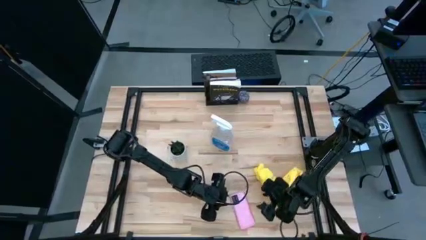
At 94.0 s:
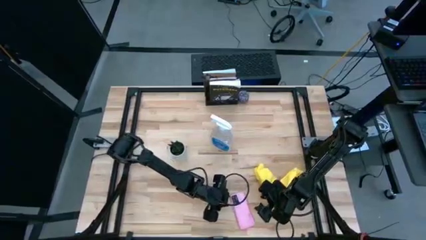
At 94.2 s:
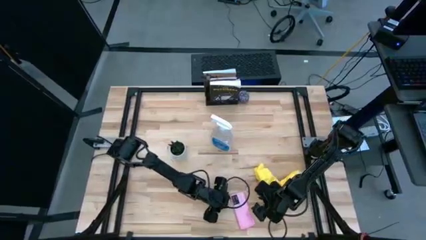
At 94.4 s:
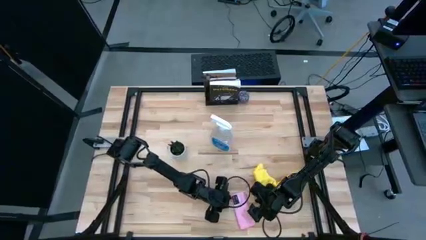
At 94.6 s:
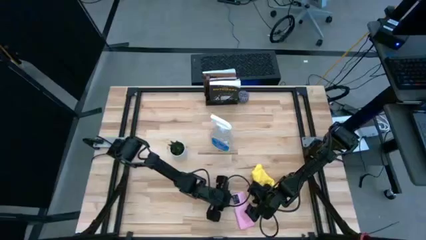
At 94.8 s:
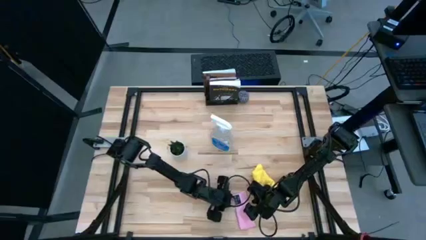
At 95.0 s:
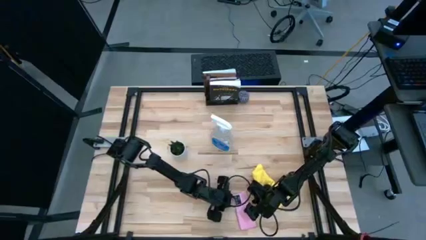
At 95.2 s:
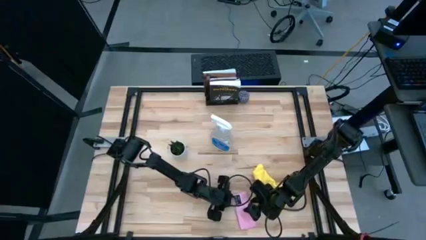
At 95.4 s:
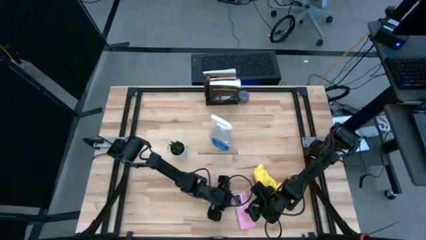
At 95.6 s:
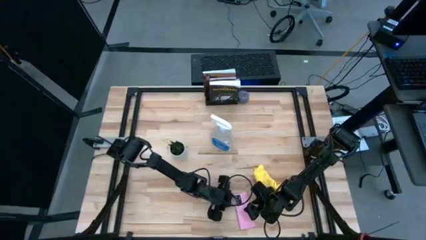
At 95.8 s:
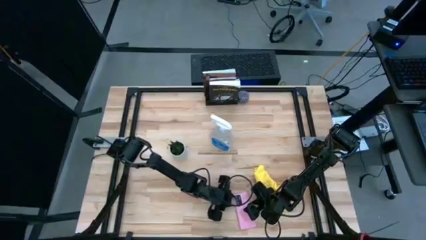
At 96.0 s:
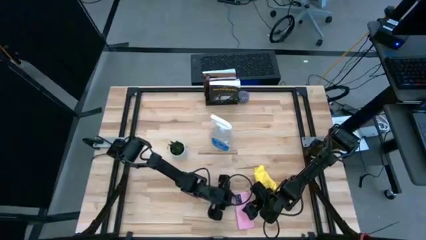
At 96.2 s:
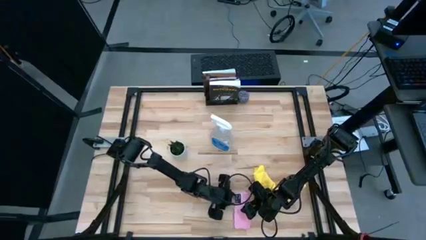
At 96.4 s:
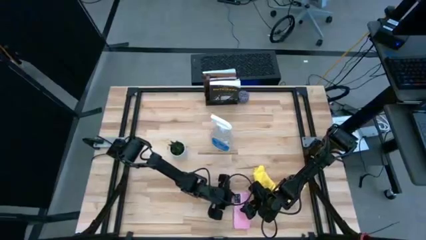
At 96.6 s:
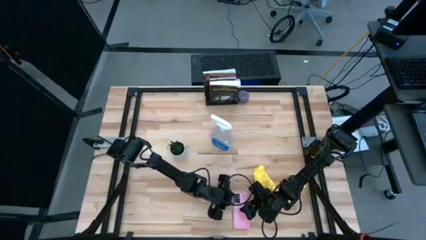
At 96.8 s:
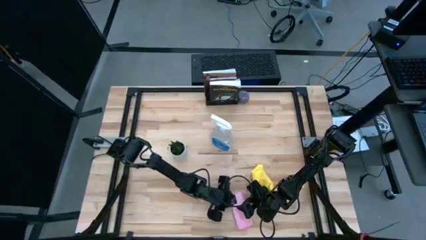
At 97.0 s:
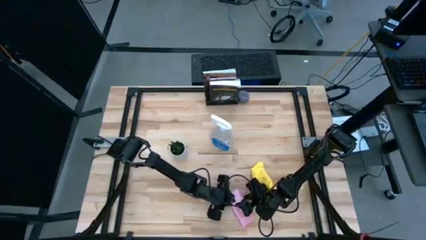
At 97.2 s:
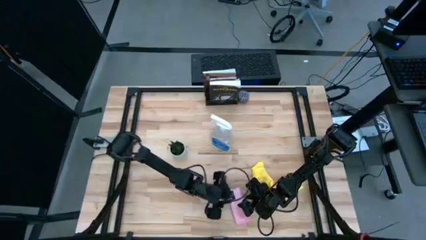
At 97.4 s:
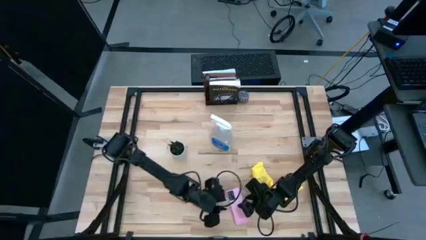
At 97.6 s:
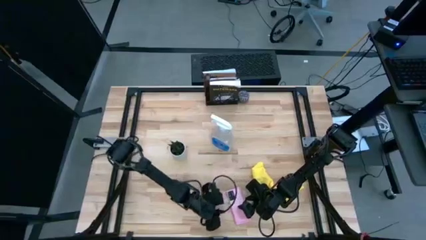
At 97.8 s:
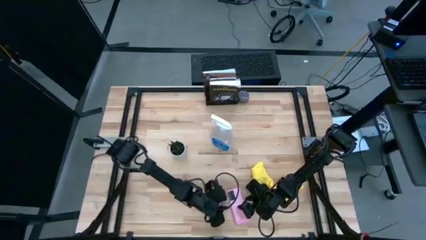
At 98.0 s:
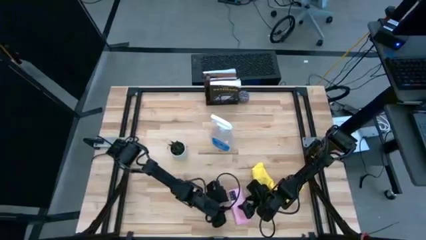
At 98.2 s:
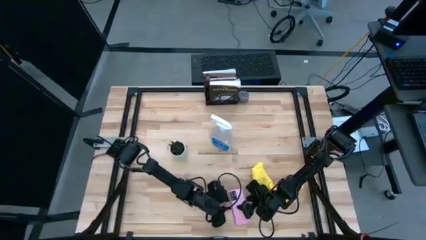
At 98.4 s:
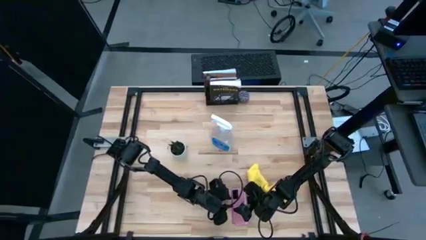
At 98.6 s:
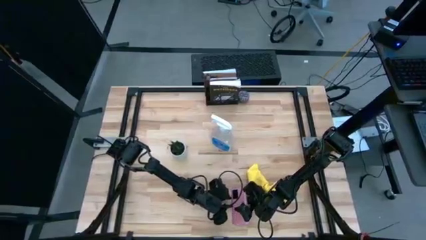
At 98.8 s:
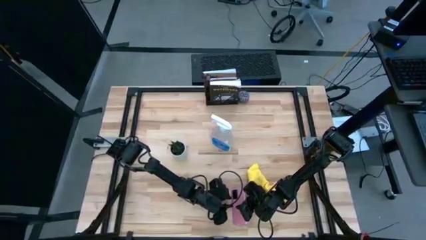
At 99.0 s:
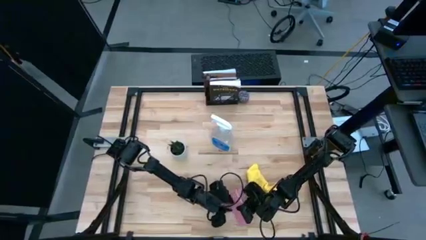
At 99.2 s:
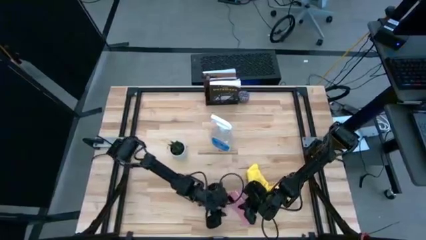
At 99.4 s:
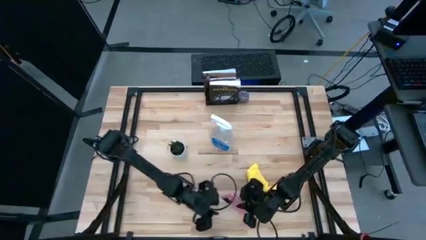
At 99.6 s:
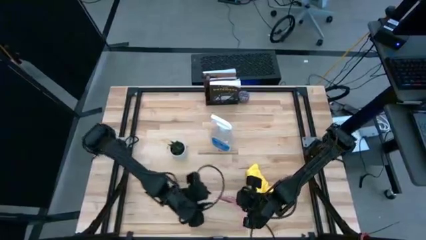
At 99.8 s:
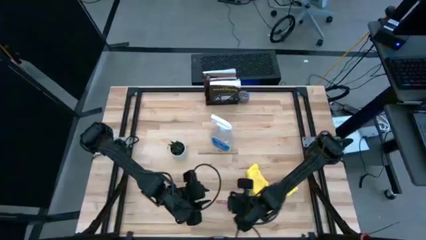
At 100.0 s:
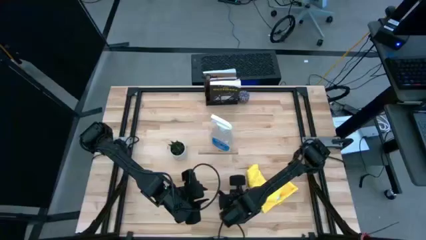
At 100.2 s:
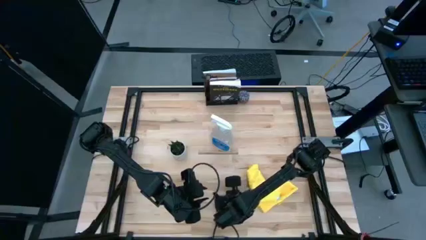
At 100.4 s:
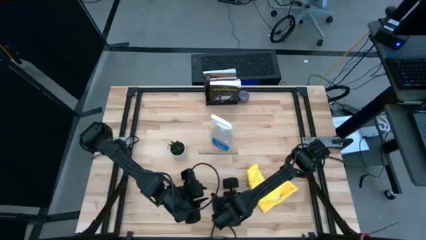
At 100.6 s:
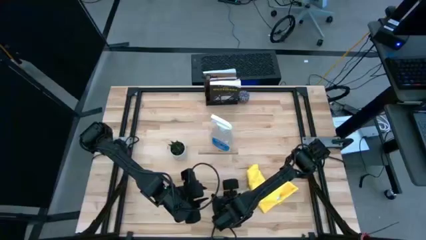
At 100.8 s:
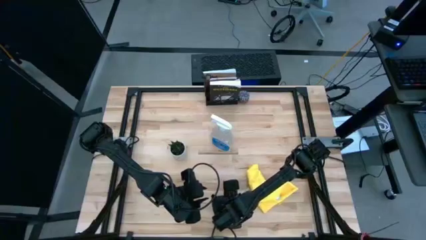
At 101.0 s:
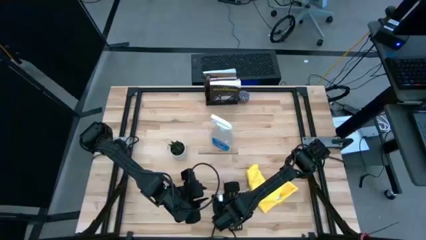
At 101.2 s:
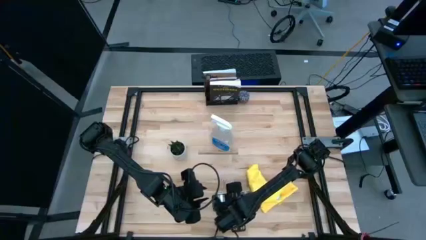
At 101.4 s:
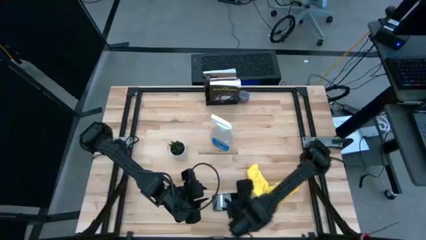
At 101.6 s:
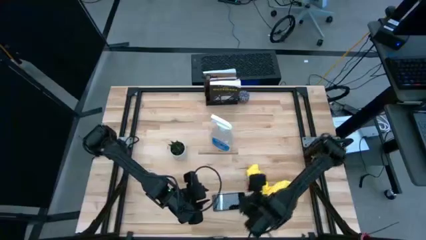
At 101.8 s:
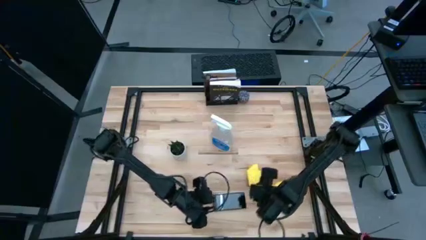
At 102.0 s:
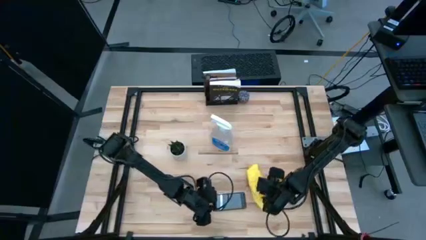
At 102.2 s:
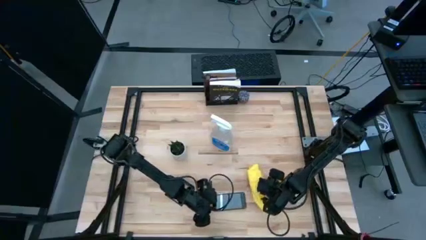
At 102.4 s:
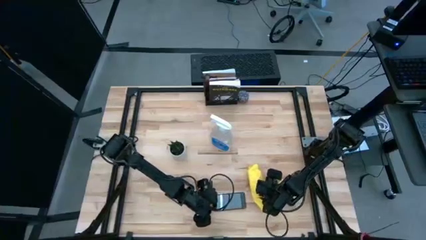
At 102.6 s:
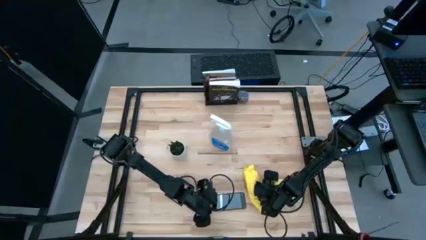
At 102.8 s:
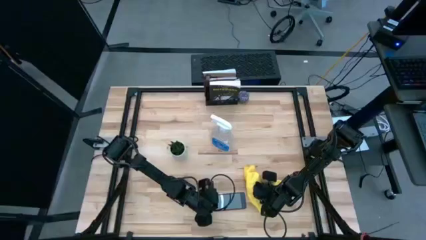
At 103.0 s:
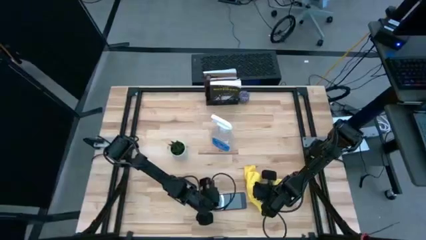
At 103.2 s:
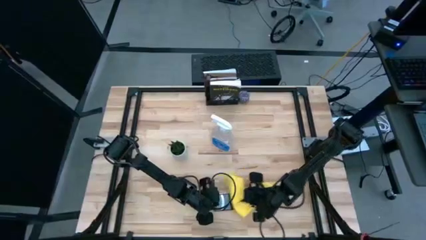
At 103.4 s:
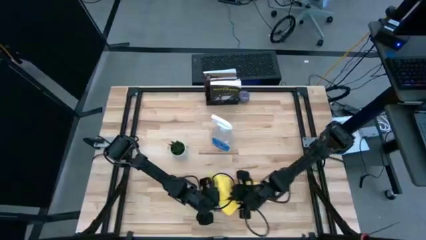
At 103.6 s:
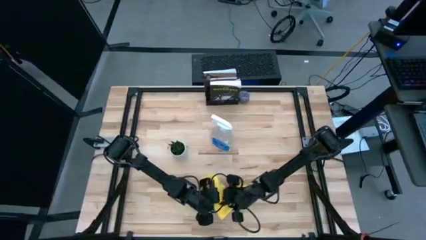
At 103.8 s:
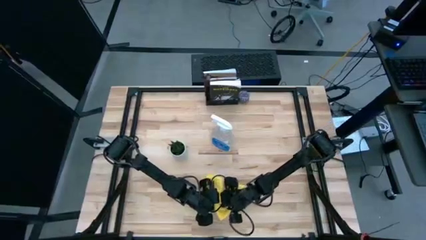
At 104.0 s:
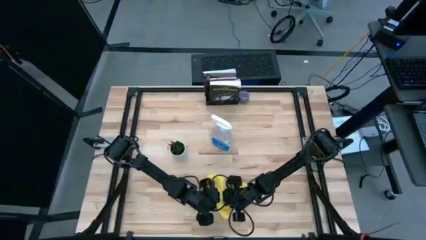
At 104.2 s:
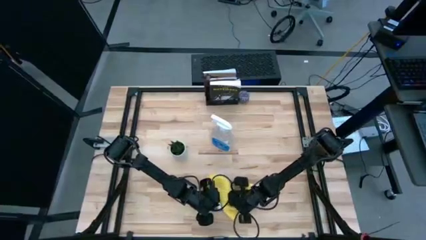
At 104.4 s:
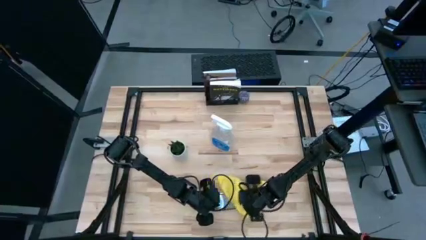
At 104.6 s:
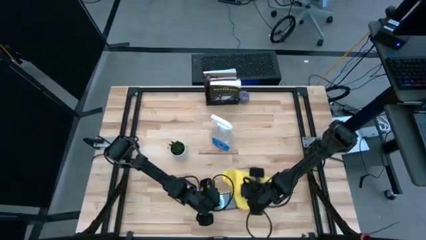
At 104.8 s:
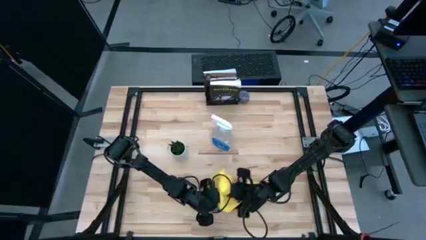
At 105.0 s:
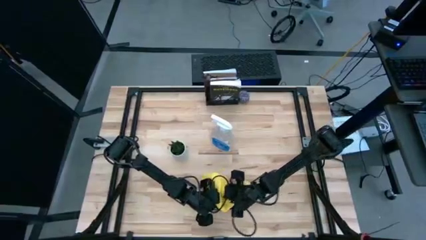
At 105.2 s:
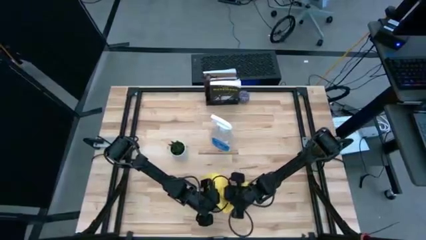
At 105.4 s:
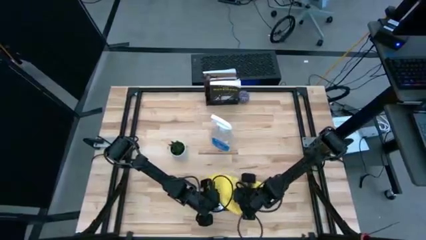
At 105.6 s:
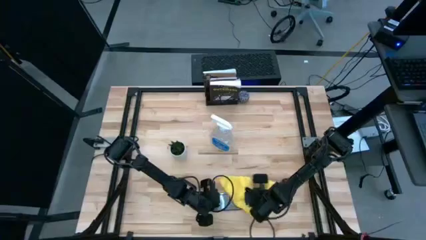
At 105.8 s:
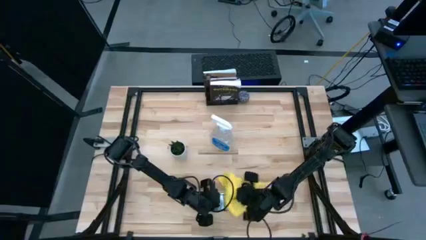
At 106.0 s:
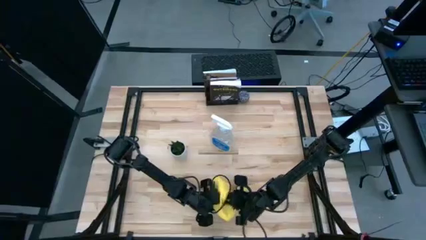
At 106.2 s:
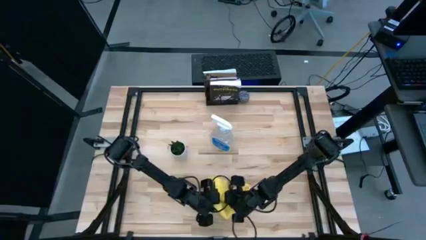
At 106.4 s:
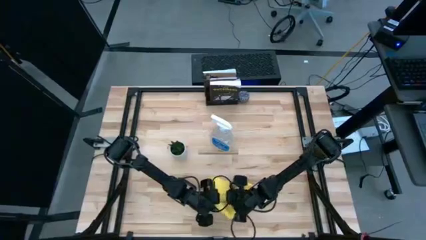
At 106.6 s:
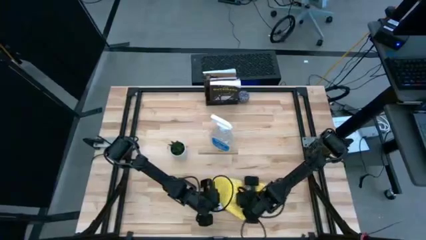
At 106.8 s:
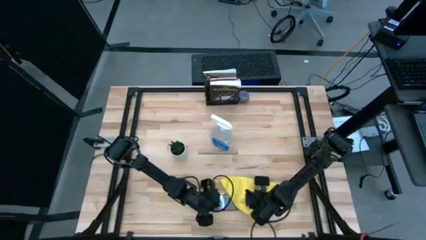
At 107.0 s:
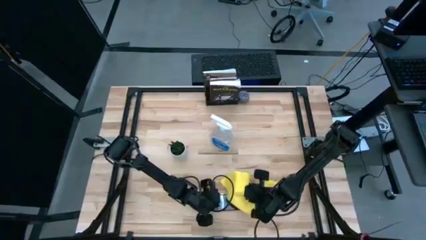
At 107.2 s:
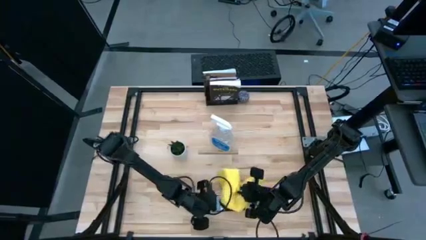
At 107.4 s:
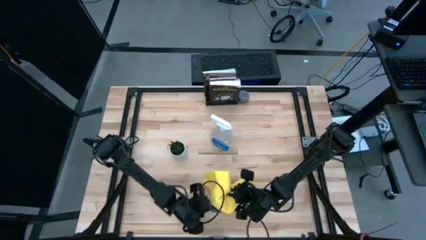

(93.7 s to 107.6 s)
Task: Apply microfiber cloth
Wipe the front of the cellphone with a microfiber cloth

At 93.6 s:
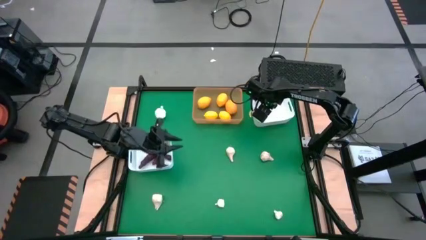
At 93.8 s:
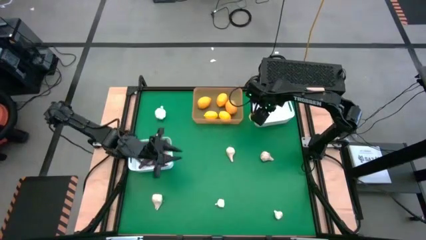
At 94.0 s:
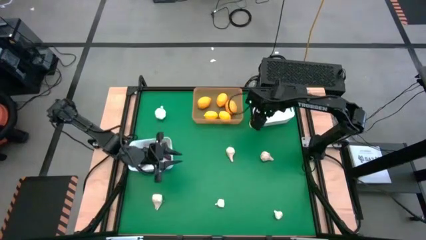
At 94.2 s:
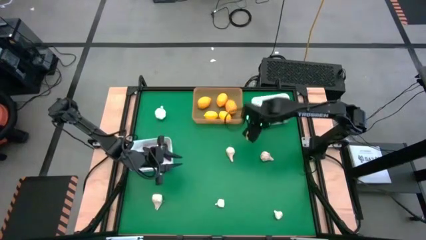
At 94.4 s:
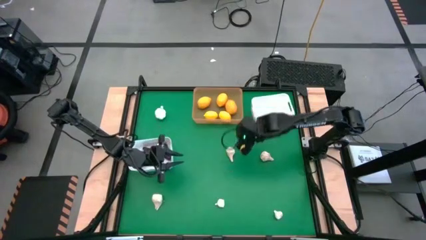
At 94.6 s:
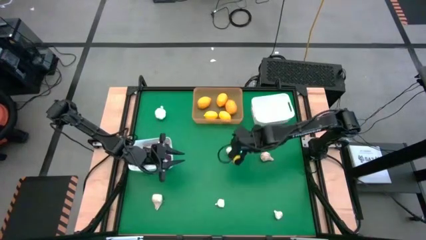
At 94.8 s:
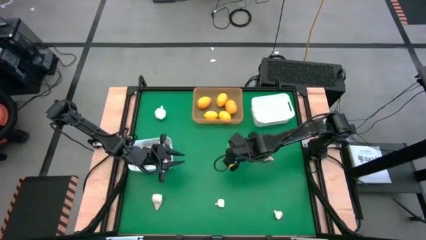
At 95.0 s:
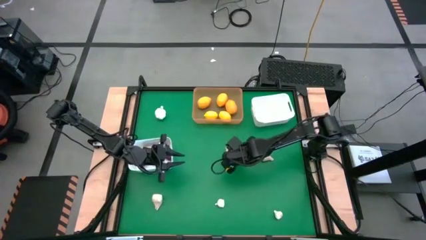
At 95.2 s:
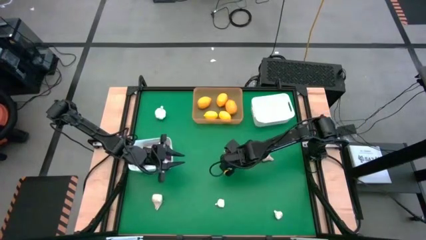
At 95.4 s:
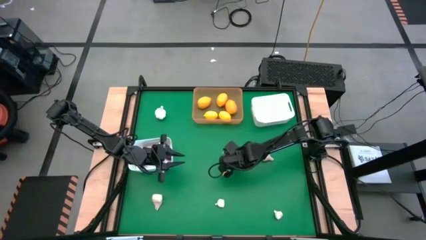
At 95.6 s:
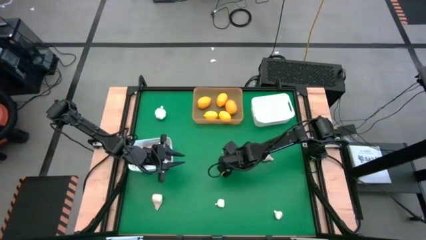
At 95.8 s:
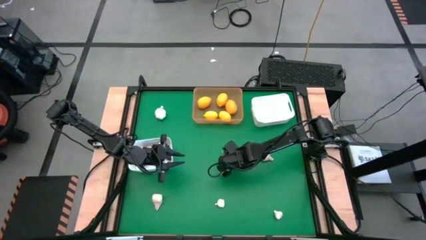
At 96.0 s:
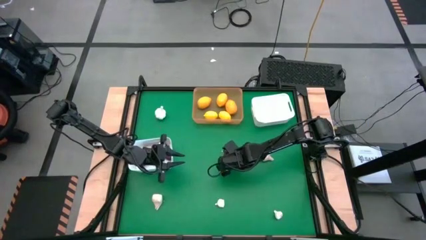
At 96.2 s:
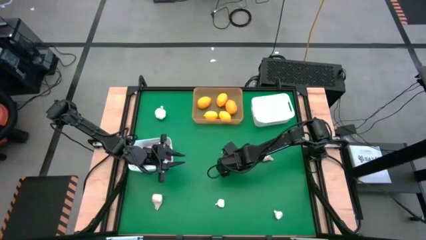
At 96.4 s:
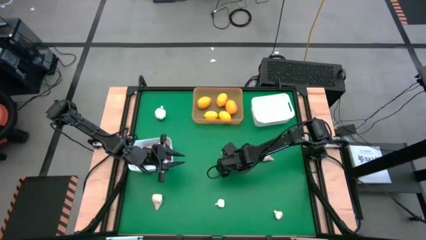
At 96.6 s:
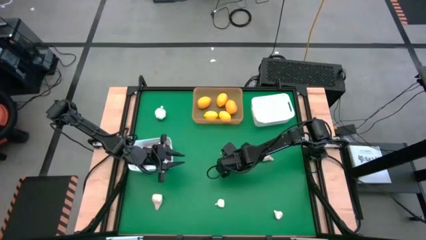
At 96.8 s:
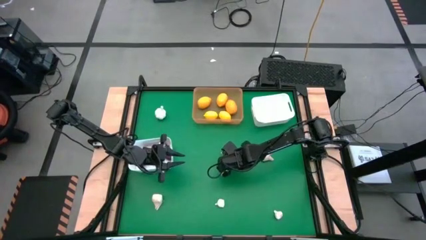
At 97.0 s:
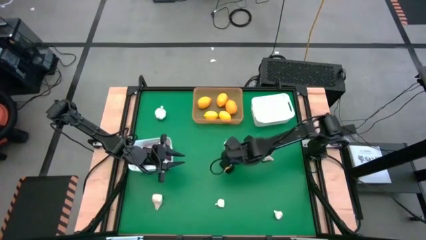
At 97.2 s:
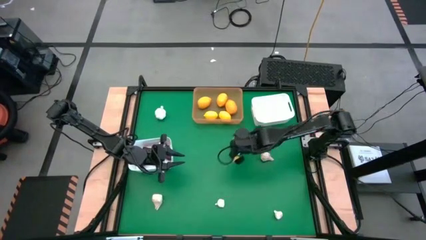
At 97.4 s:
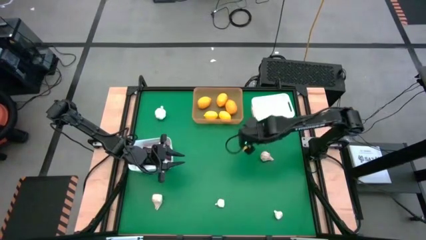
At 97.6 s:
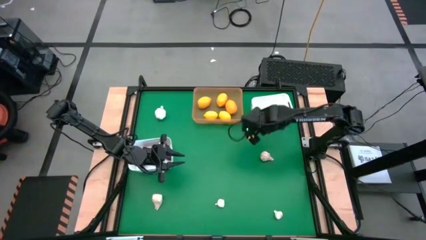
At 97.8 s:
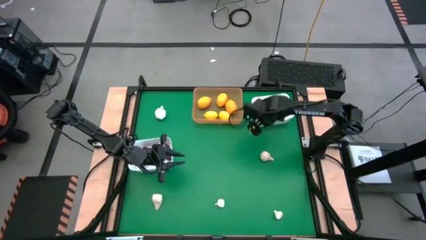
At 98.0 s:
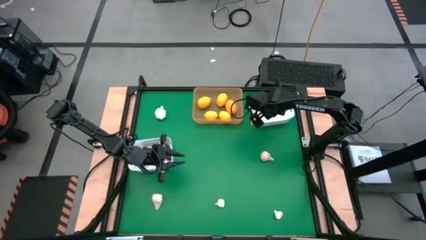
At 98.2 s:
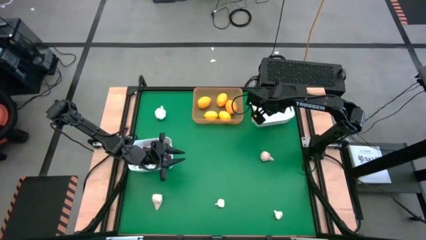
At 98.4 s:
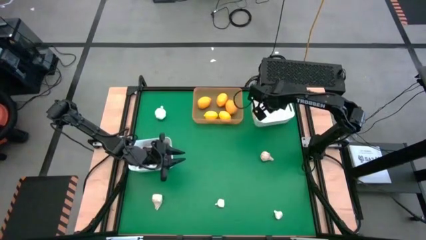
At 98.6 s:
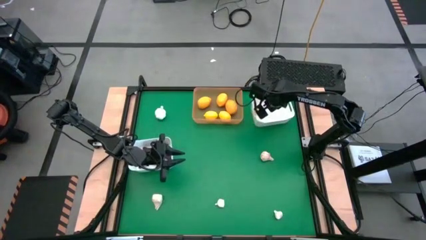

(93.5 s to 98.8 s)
Task: Sort produce into baskets
Put the garlic into the right white bin
